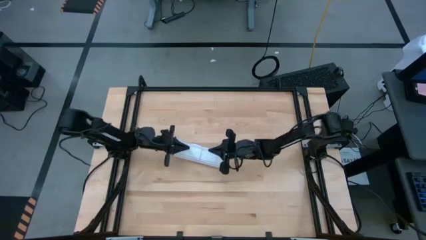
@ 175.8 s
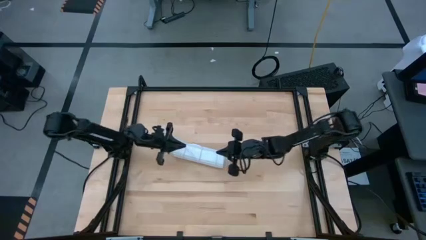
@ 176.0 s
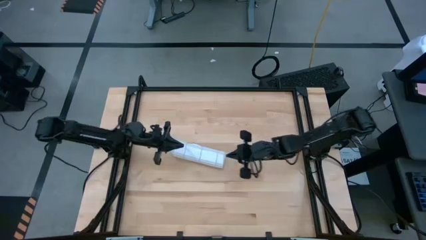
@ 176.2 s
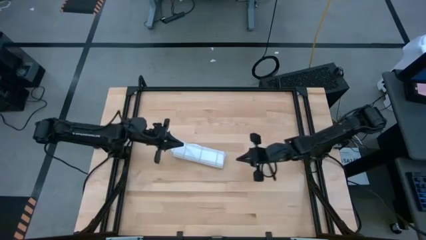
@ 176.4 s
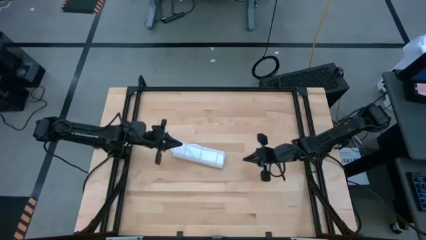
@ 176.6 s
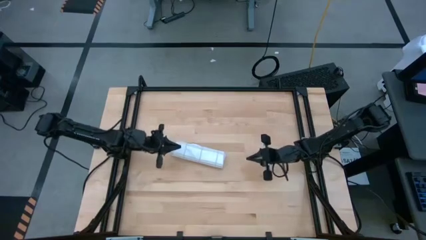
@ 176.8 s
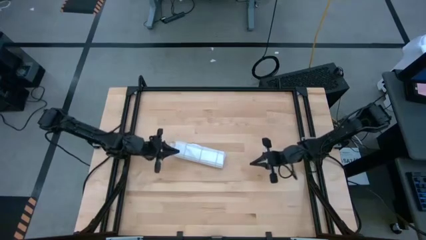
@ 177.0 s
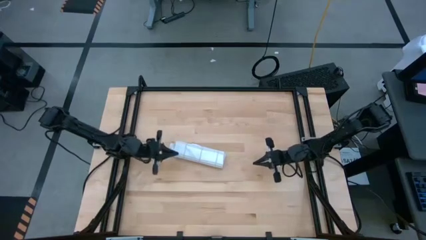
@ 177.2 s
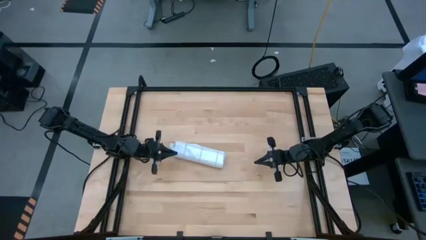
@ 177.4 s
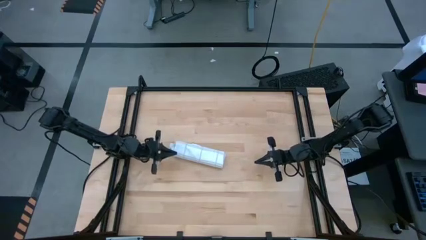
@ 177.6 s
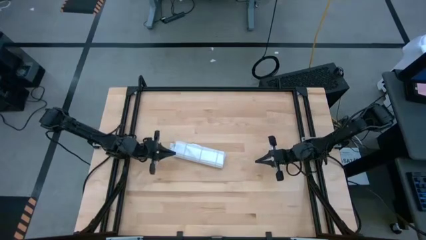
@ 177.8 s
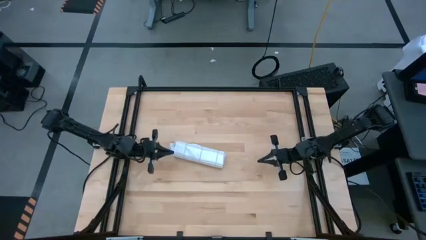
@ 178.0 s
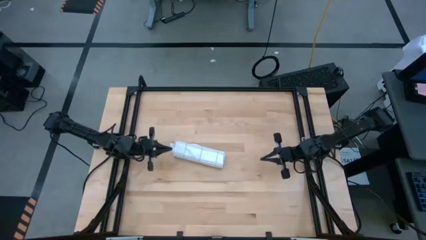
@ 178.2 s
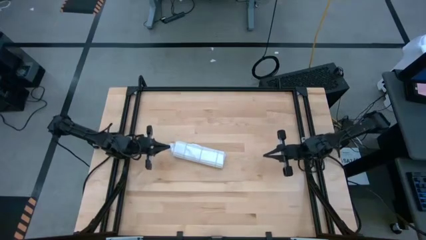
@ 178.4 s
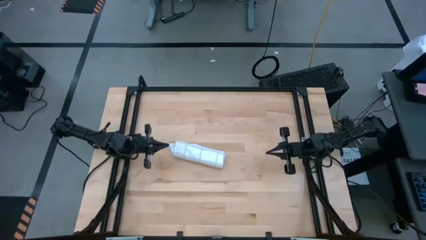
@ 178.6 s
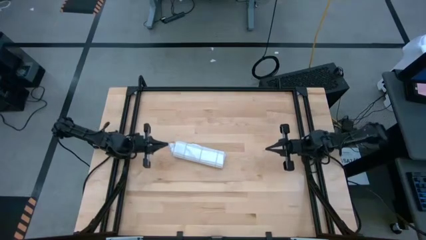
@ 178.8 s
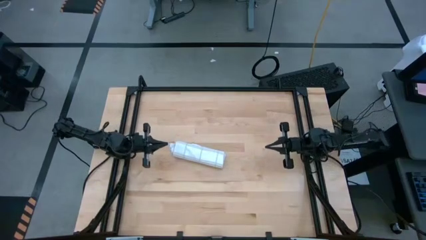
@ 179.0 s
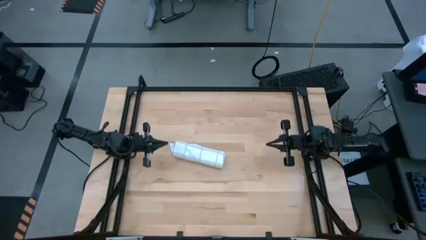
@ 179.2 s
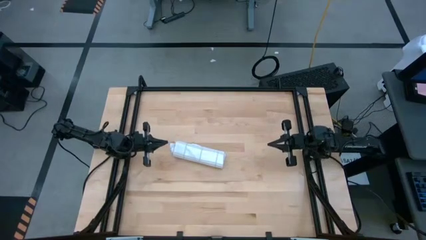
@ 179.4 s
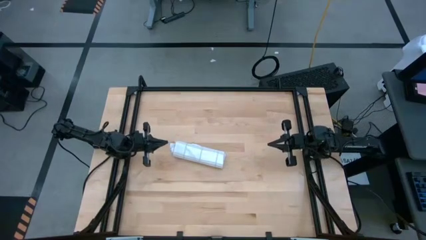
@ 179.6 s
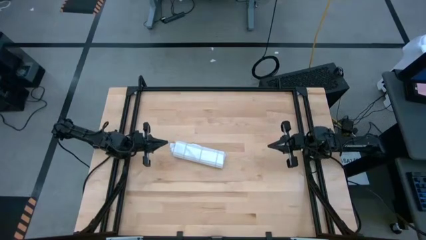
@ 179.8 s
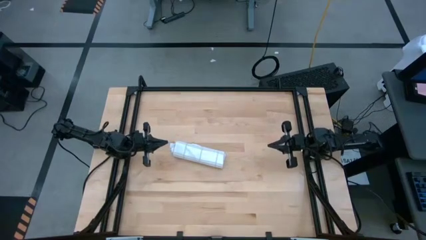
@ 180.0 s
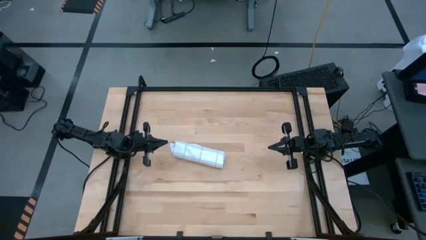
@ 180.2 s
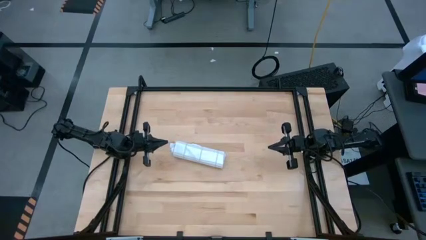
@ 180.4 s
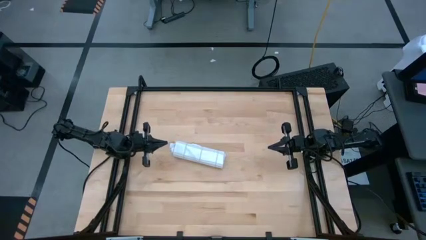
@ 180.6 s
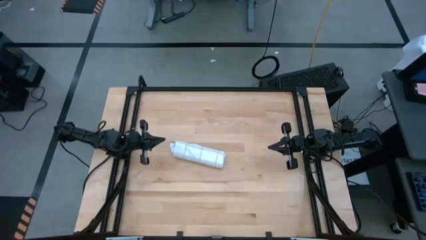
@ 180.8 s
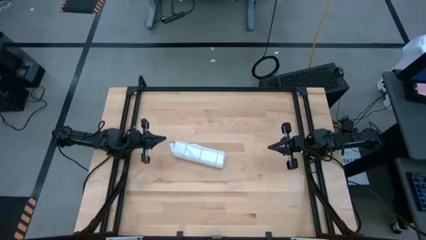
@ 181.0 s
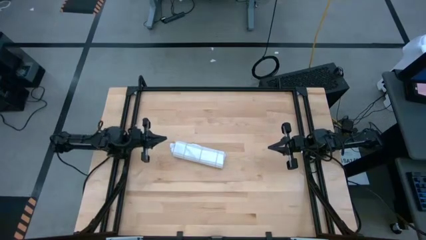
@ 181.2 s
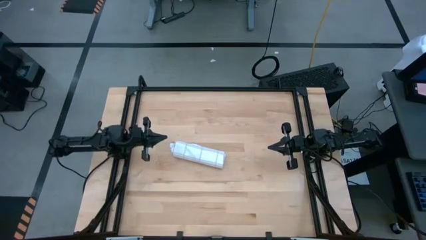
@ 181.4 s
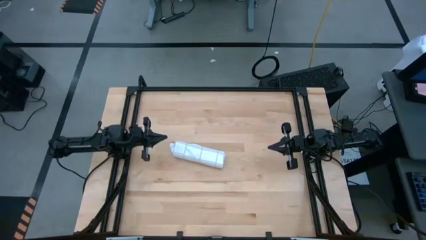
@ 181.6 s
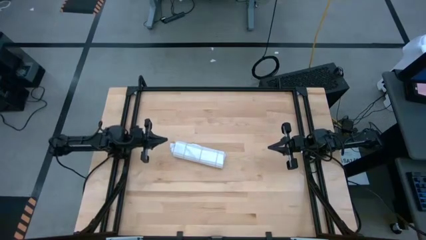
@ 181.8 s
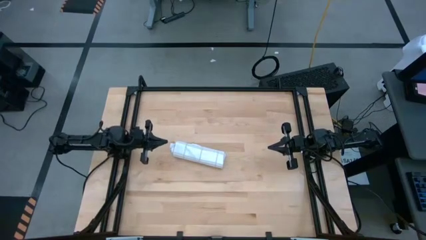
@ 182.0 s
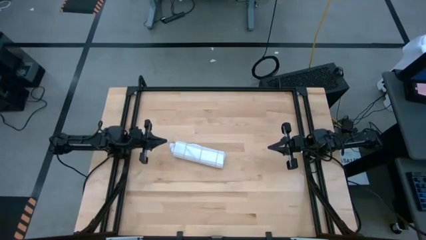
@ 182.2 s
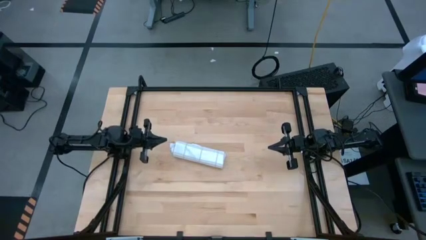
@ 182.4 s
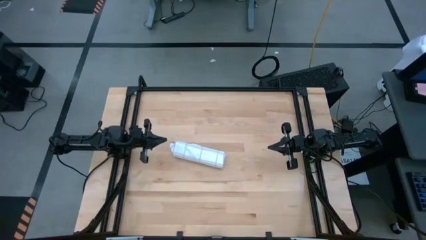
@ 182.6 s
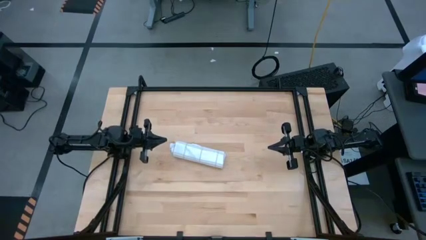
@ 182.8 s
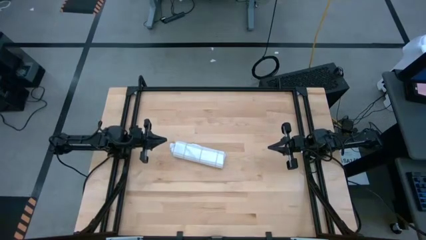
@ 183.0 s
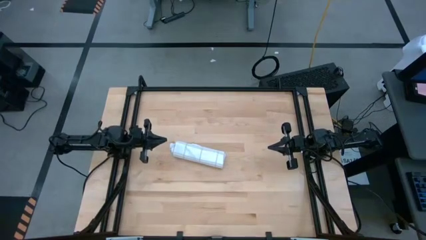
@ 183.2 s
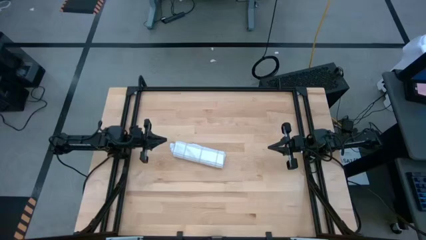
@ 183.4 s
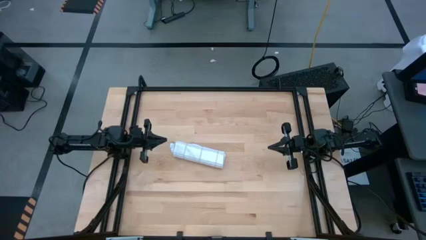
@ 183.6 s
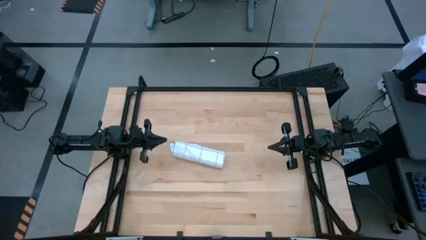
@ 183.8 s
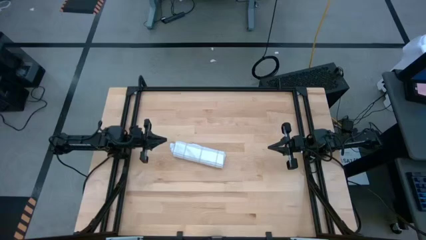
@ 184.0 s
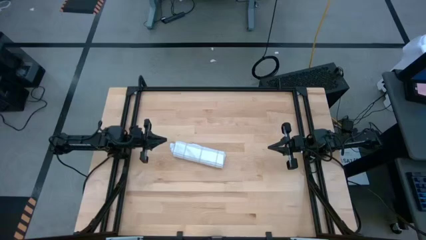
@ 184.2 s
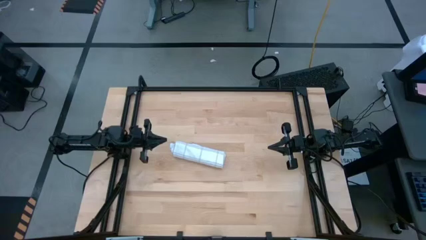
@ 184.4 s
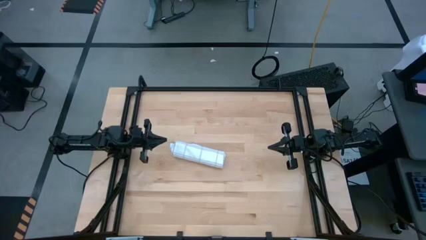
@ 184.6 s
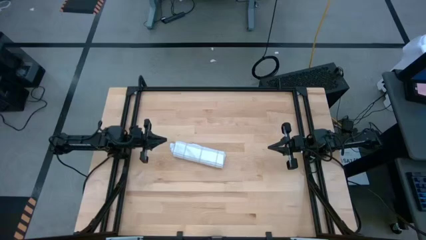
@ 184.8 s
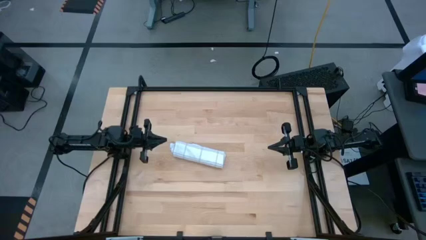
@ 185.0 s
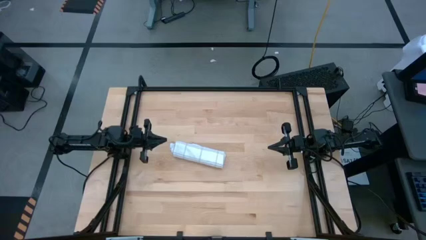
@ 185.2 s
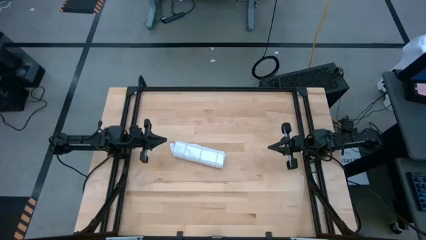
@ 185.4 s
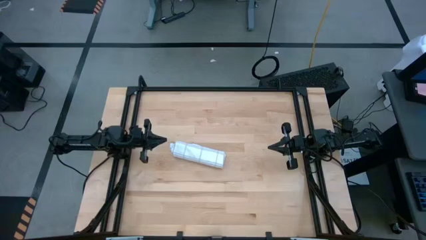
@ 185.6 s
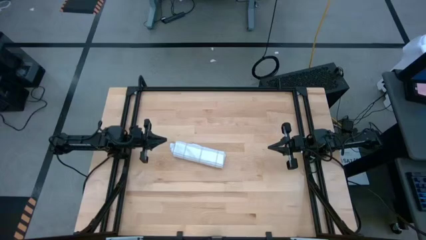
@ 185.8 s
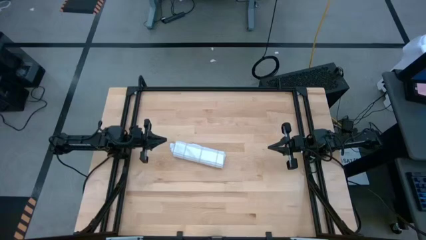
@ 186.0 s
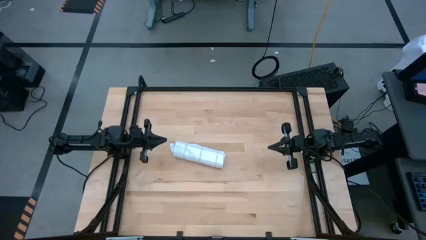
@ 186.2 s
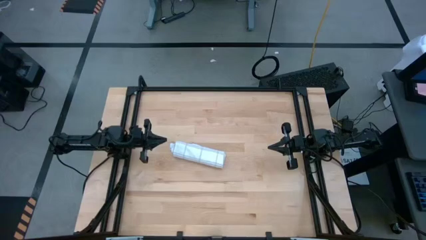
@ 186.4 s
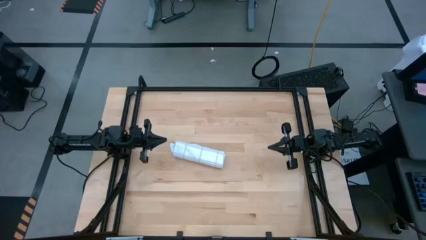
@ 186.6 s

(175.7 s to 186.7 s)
Task: Roll towel
Return to Home Position

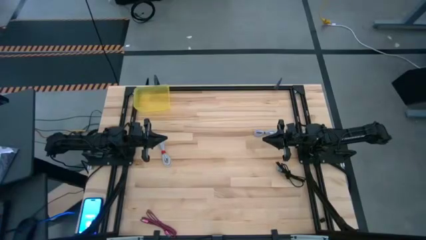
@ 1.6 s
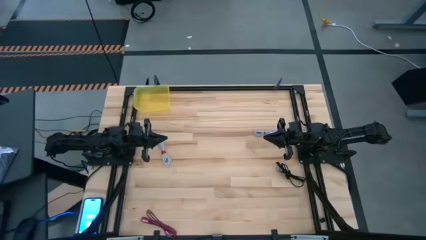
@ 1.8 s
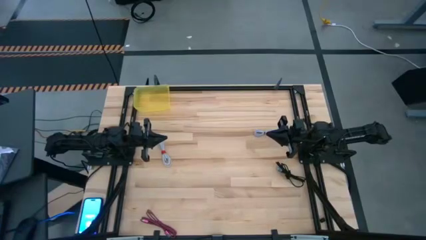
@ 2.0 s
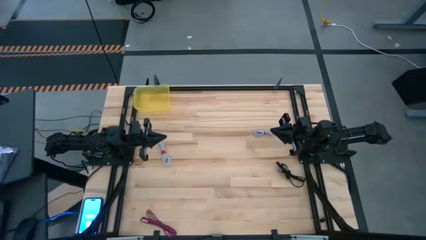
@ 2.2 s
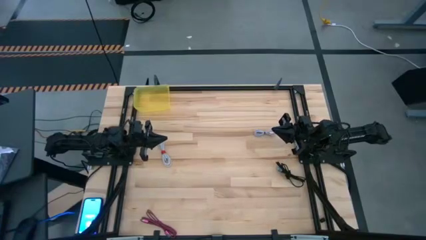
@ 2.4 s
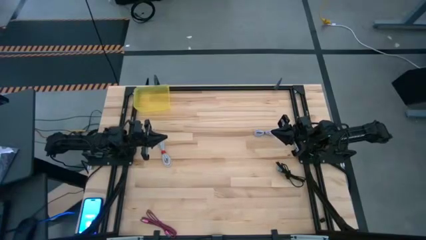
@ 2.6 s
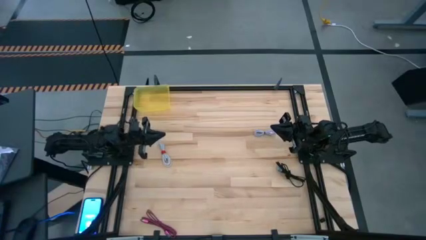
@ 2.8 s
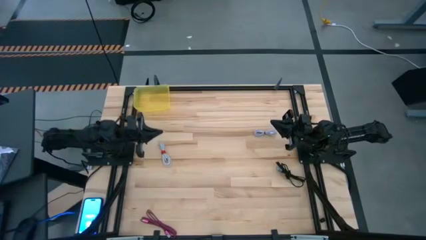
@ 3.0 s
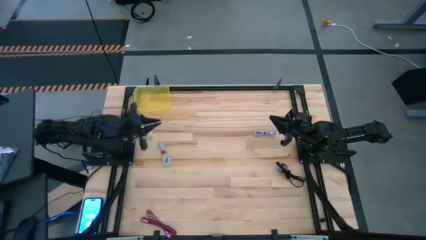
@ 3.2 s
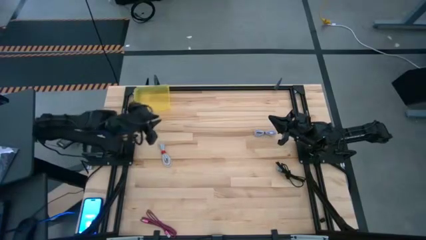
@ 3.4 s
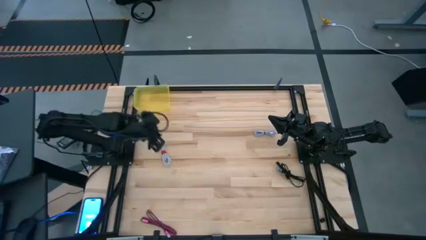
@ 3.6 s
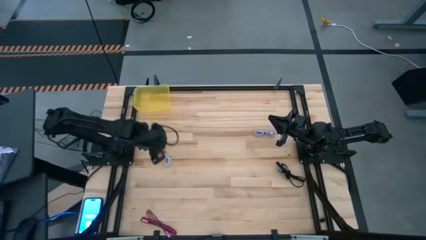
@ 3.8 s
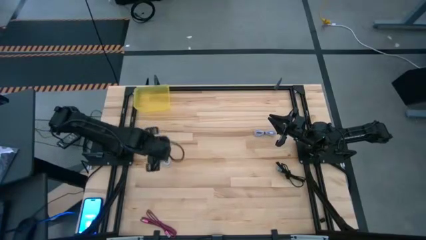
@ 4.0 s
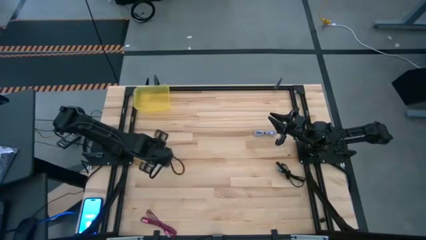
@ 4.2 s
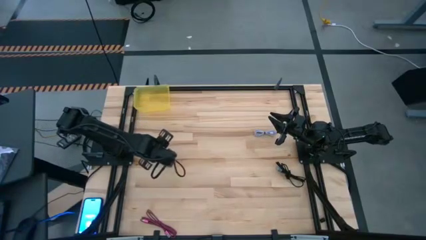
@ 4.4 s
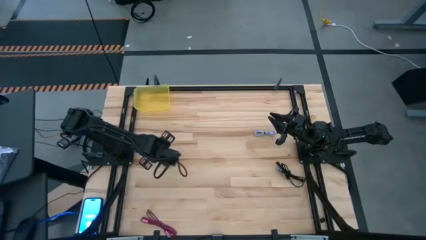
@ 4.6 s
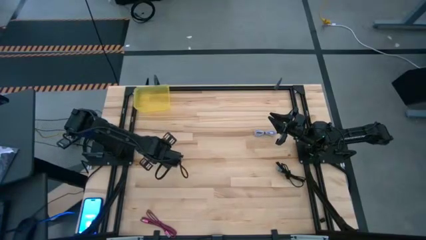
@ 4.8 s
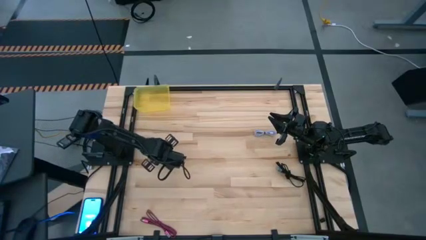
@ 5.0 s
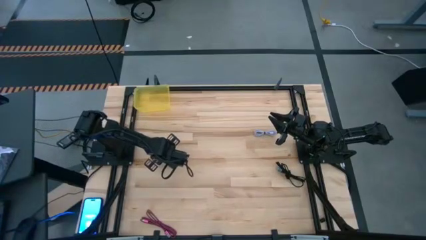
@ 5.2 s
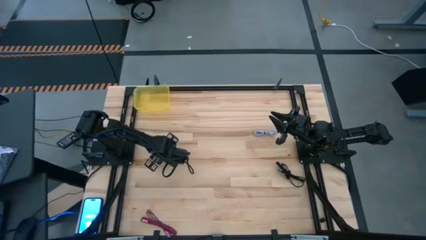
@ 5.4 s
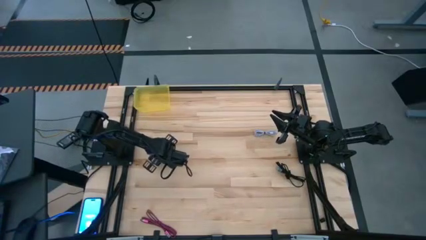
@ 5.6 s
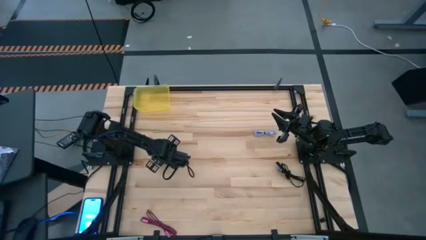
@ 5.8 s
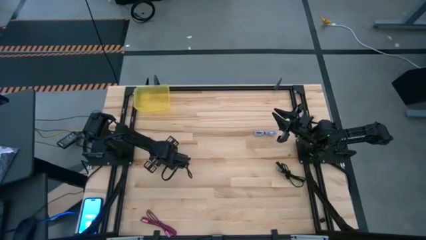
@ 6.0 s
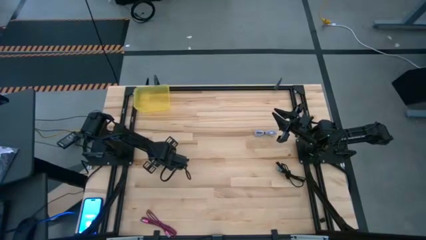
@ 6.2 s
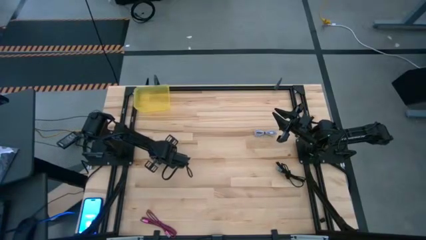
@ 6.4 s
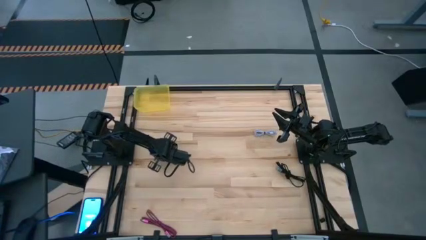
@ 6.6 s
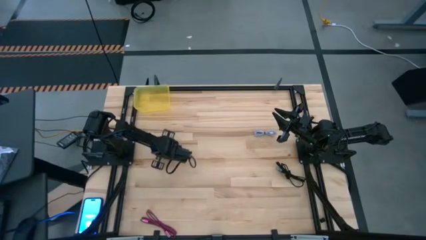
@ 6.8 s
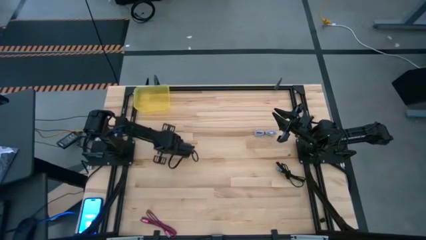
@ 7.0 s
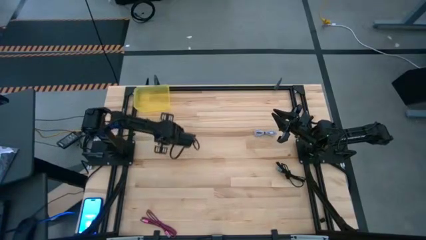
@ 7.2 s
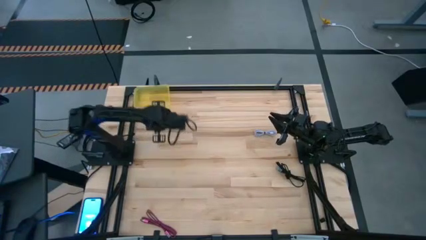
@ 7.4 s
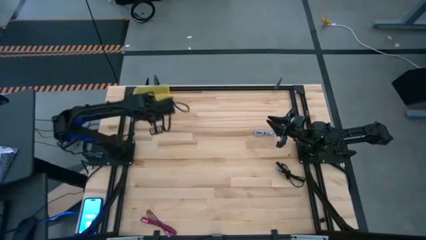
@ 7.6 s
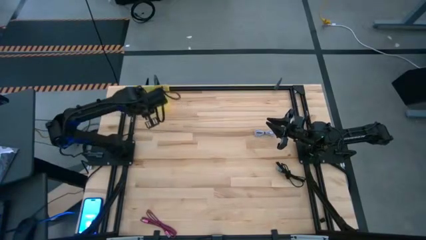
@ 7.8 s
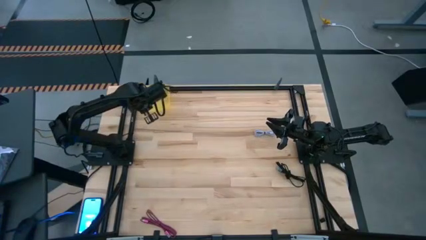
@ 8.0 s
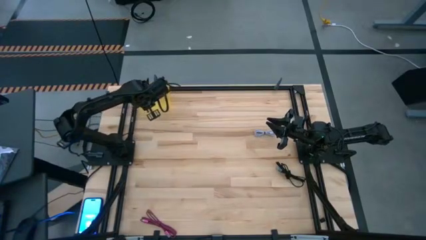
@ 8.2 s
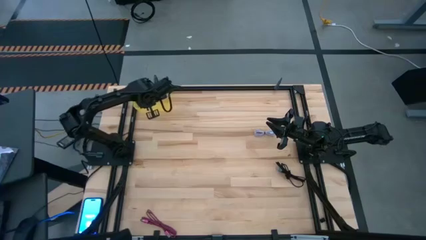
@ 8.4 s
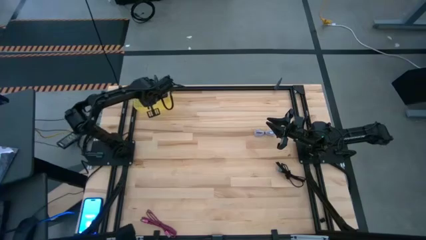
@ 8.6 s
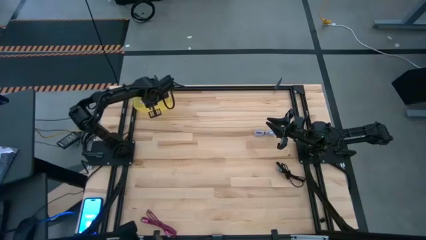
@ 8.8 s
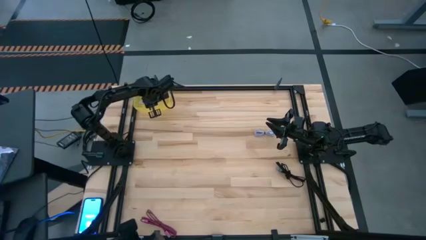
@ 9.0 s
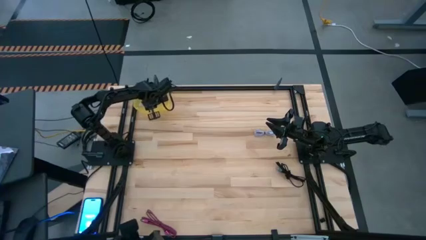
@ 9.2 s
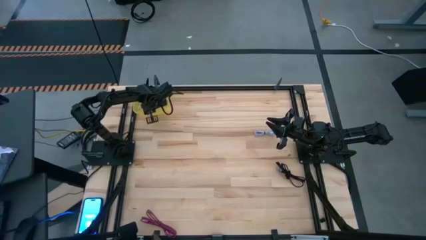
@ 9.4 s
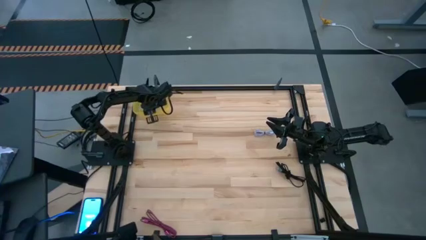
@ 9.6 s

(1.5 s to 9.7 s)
Task: Pick and place USB-C Cables
Put the left white charger cable into the yellow transparent bin
